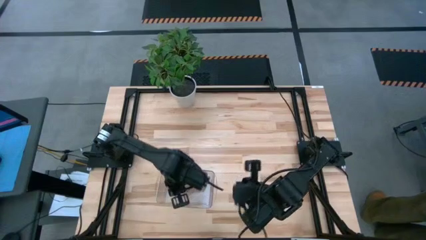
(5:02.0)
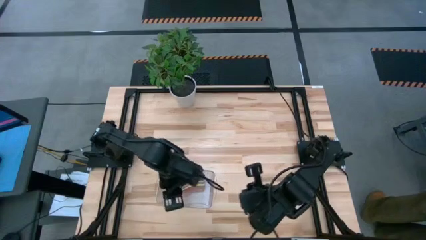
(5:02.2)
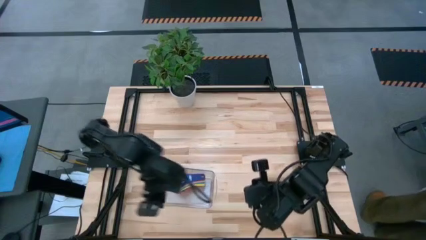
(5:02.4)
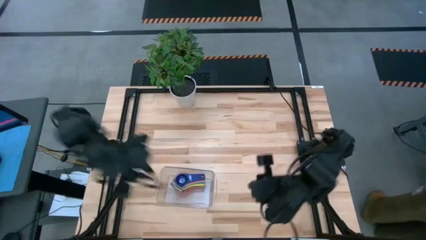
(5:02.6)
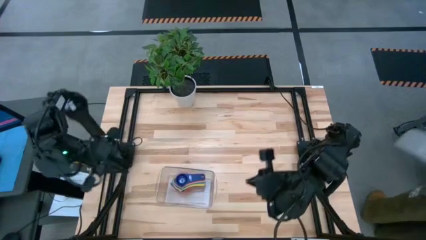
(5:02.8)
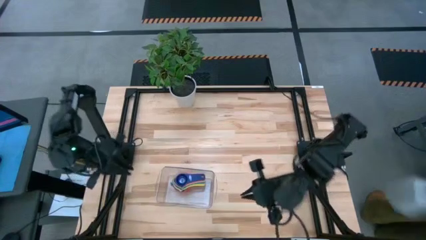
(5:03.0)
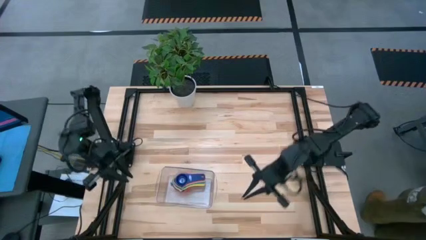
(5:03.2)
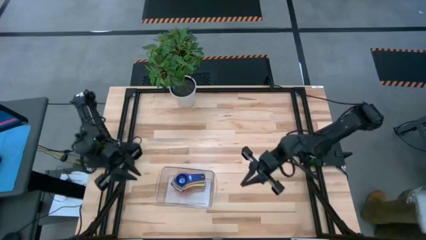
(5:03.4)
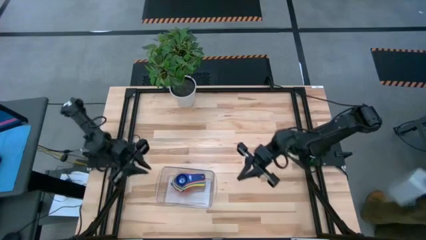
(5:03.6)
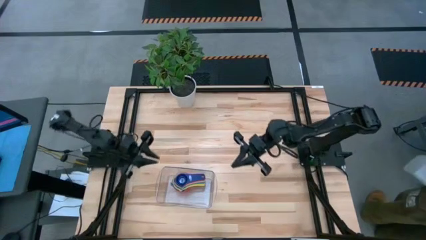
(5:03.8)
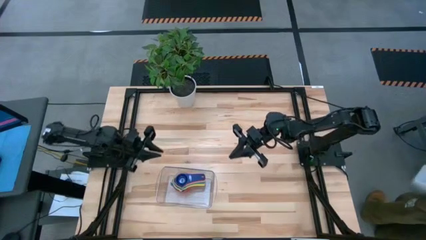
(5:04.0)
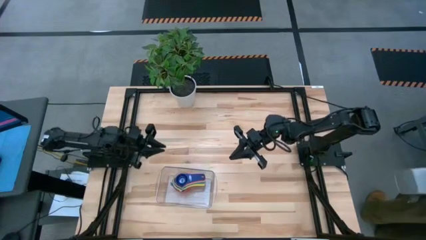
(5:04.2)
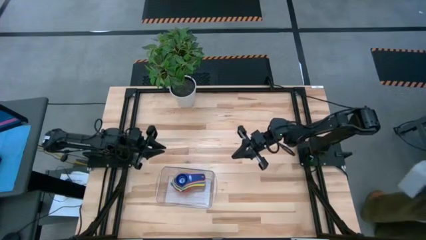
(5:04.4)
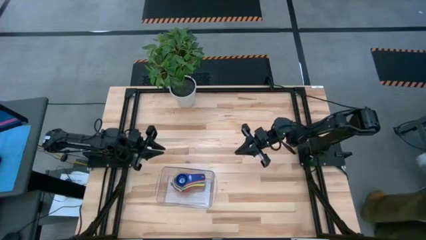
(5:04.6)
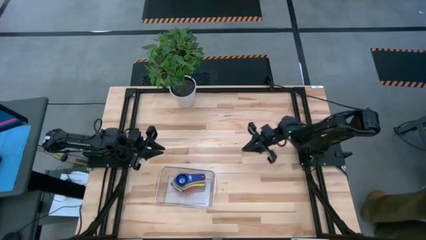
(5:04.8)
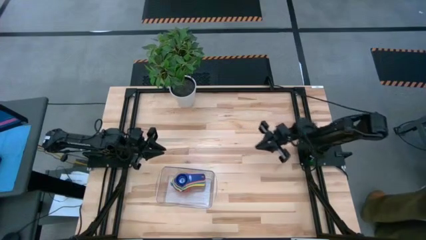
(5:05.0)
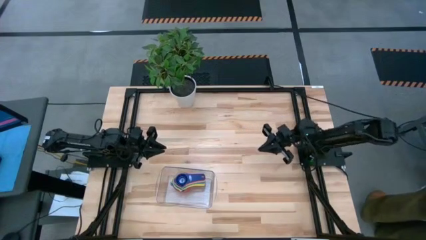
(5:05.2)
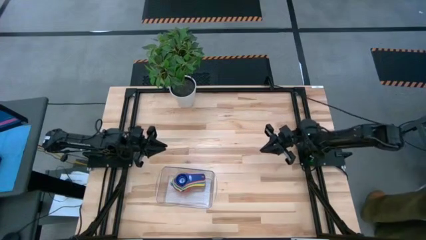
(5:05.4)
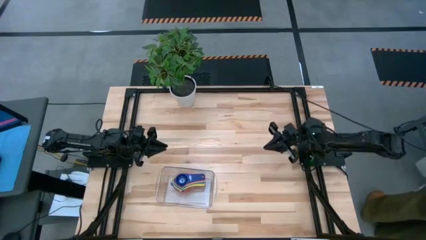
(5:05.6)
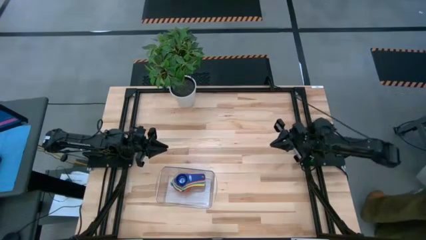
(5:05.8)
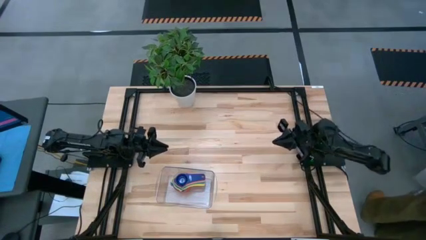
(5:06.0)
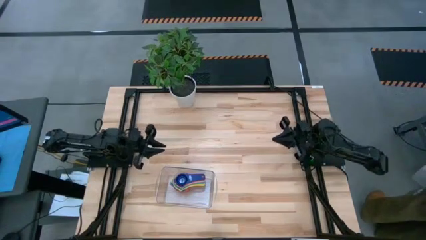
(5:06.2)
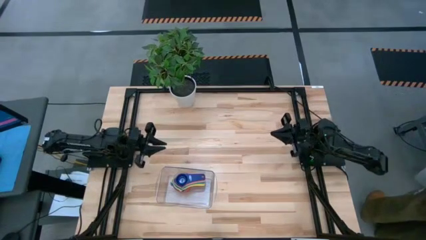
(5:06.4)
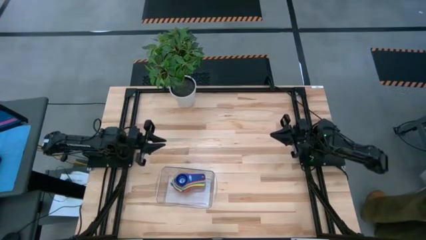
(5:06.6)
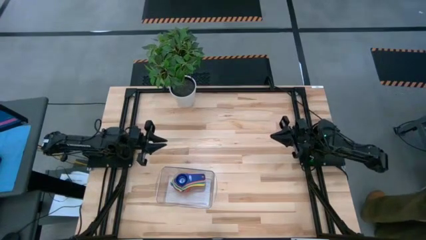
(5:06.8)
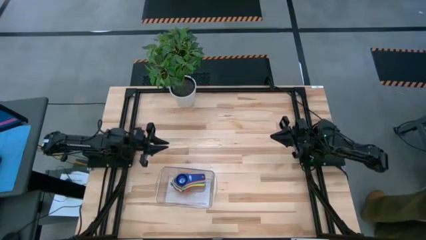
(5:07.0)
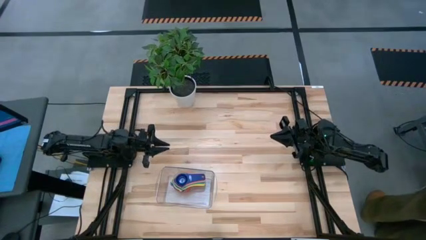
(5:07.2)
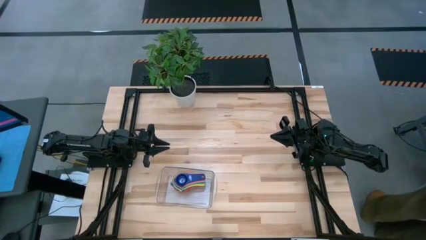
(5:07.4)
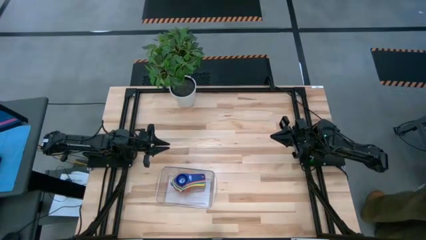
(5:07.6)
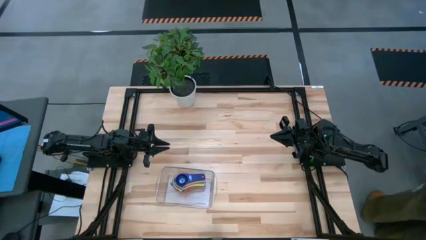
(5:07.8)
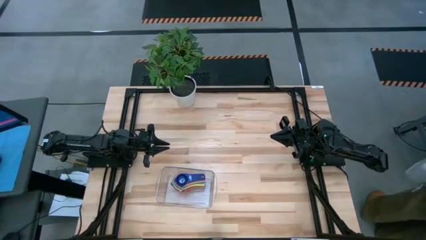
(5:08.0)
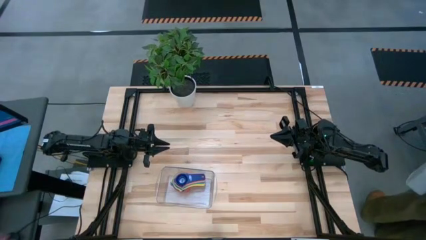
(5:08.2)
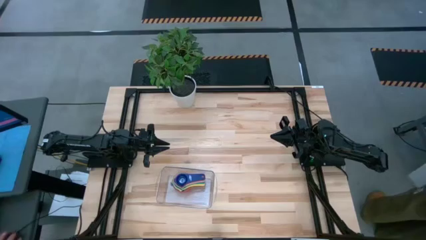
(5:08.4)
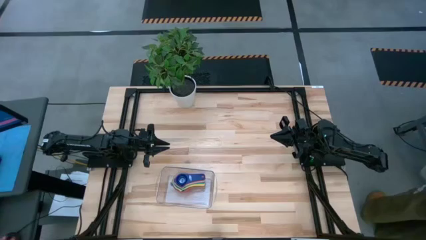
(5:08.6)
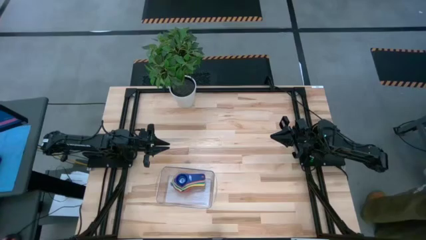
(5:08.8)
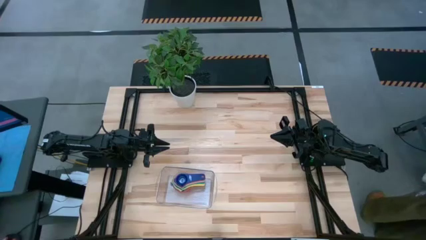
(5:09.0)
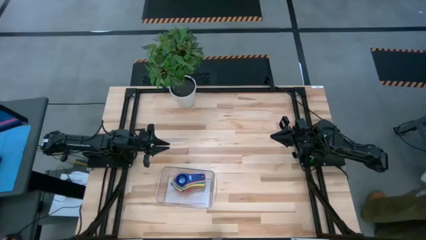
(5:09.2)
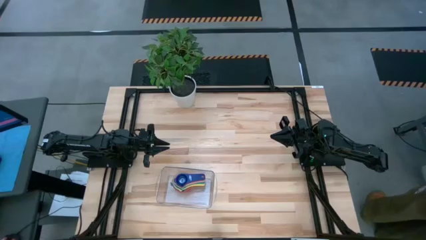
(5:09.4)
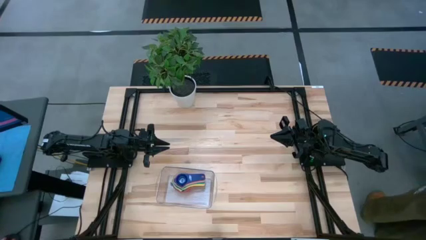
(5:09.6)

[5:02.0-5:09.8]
Task: Nest measuring cups in basket
Return to Home Position

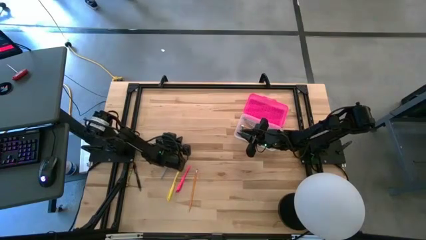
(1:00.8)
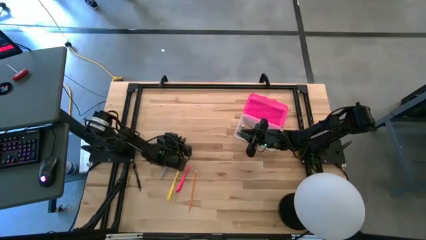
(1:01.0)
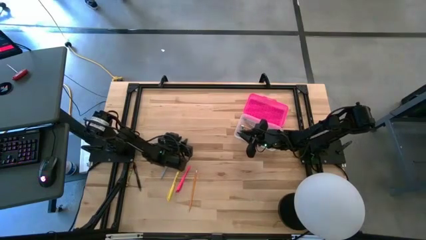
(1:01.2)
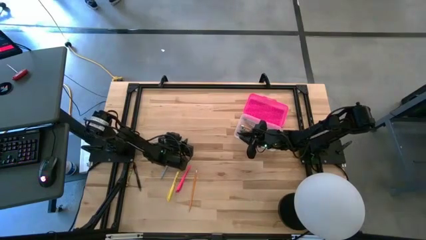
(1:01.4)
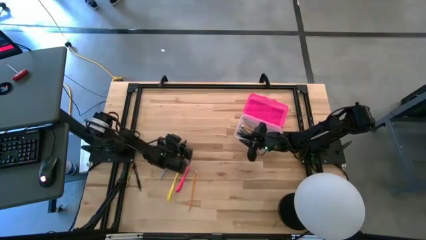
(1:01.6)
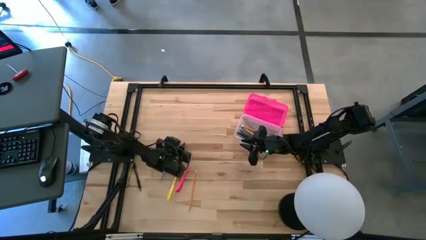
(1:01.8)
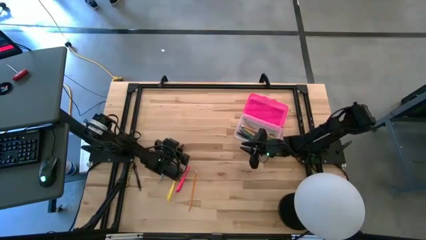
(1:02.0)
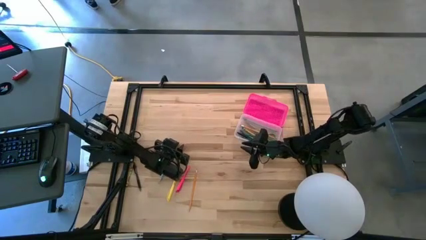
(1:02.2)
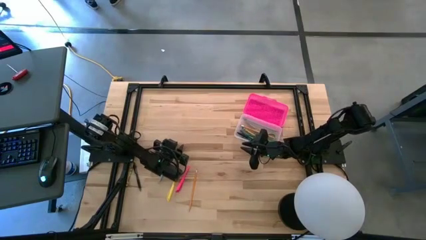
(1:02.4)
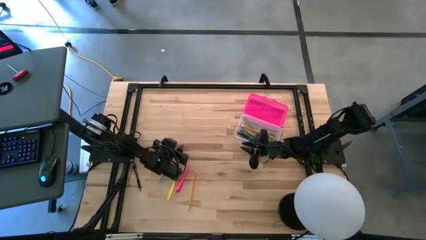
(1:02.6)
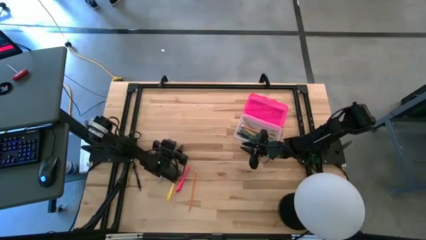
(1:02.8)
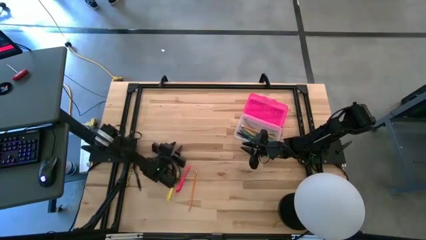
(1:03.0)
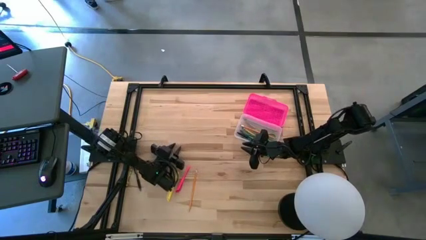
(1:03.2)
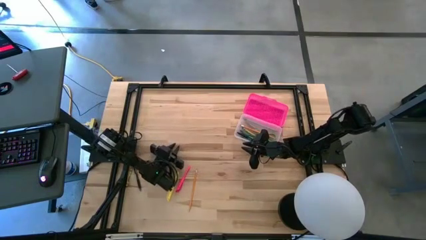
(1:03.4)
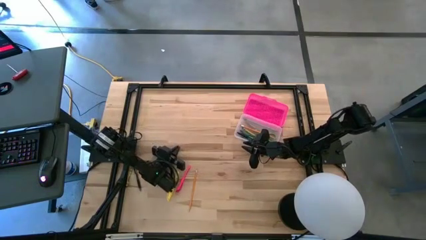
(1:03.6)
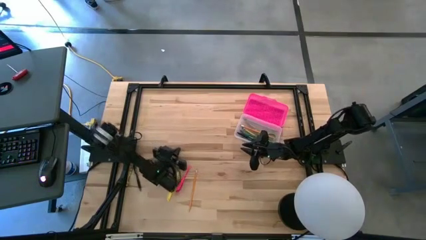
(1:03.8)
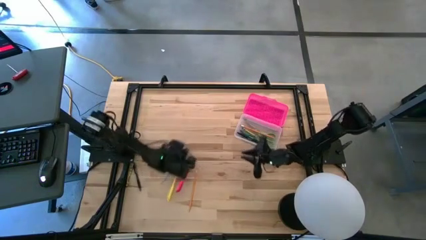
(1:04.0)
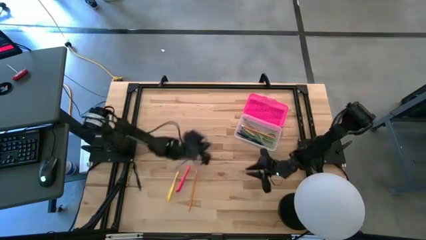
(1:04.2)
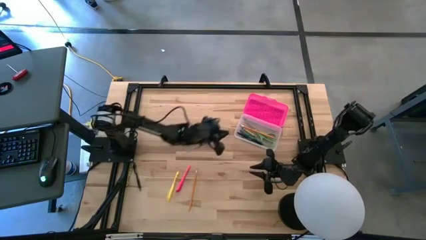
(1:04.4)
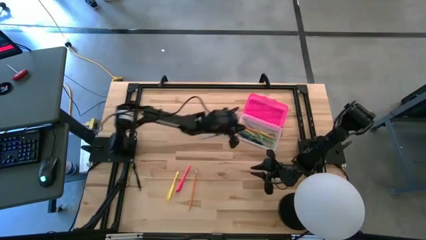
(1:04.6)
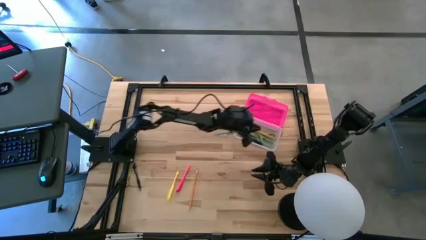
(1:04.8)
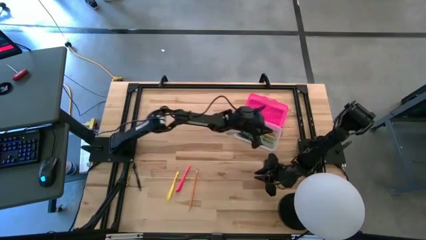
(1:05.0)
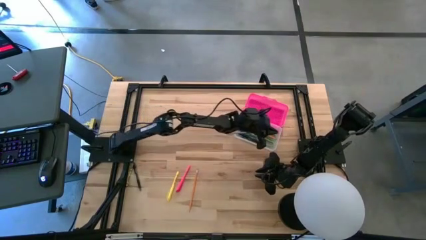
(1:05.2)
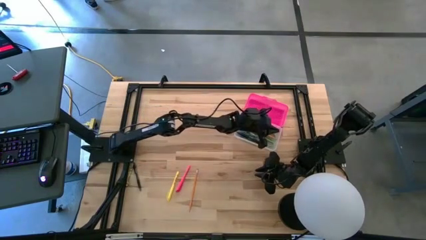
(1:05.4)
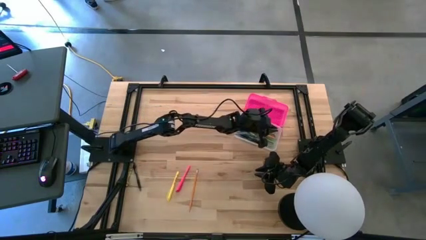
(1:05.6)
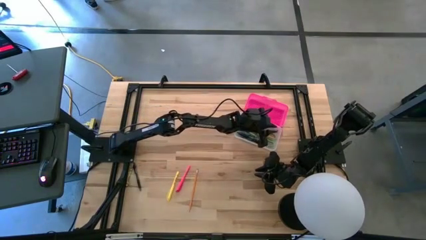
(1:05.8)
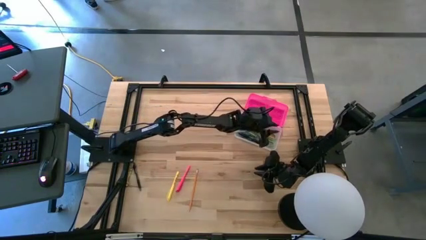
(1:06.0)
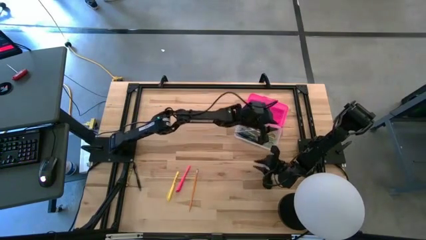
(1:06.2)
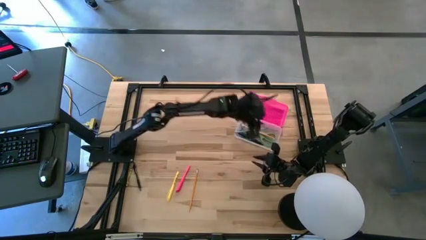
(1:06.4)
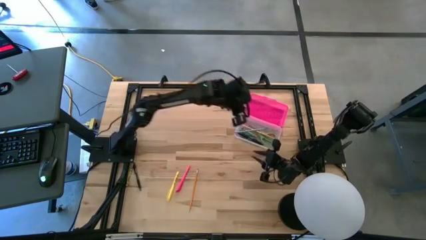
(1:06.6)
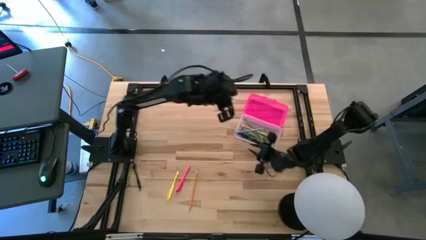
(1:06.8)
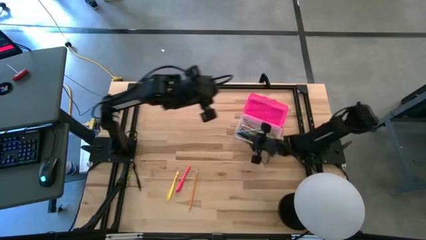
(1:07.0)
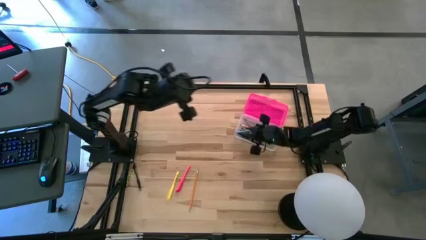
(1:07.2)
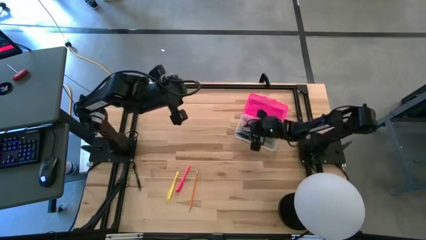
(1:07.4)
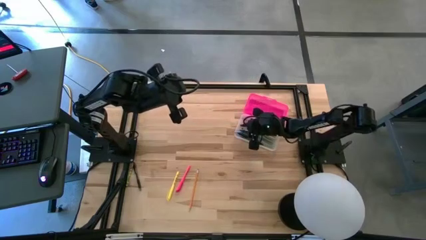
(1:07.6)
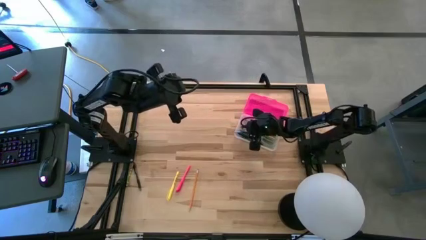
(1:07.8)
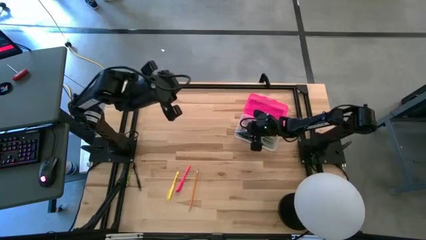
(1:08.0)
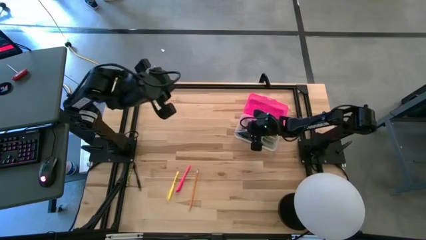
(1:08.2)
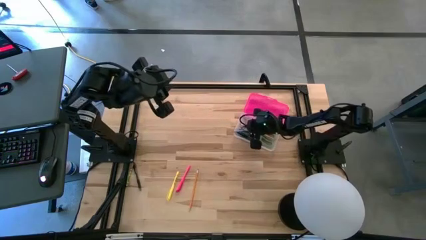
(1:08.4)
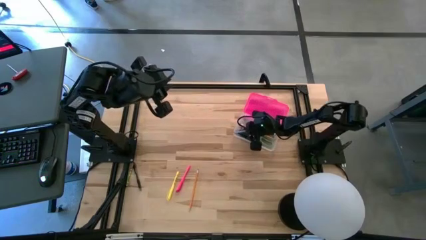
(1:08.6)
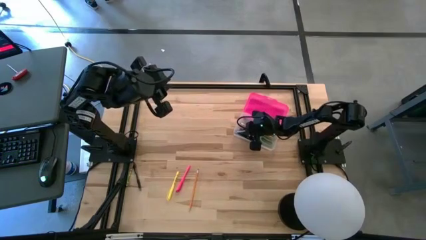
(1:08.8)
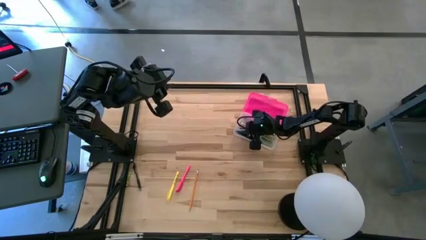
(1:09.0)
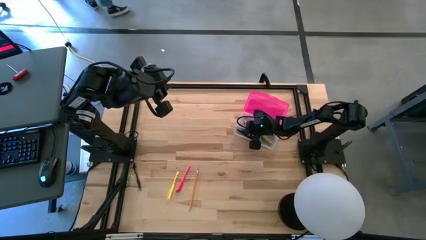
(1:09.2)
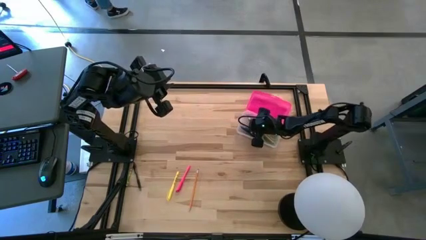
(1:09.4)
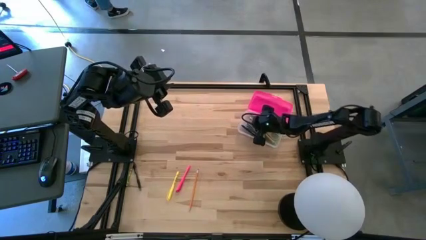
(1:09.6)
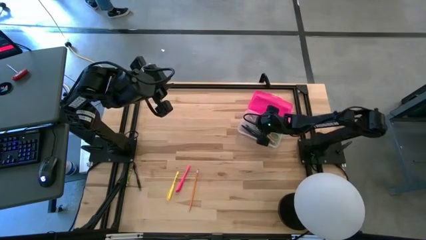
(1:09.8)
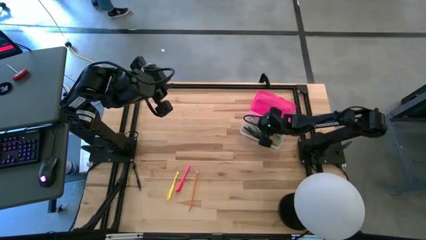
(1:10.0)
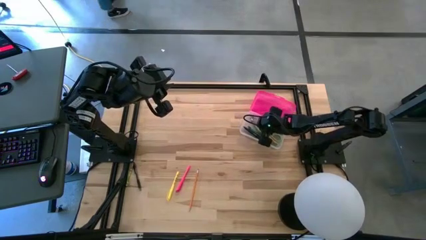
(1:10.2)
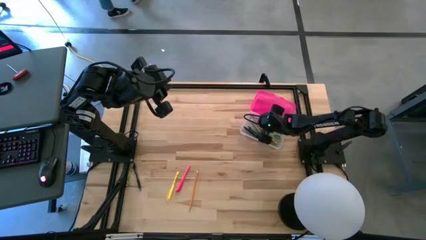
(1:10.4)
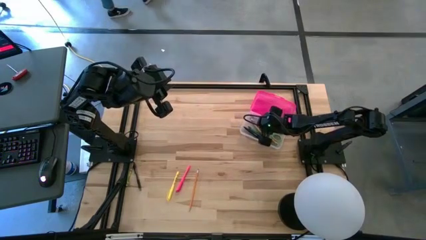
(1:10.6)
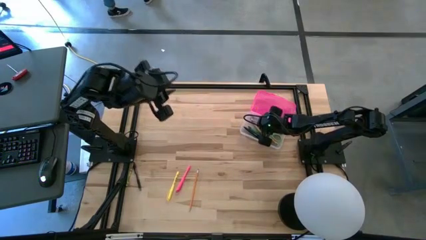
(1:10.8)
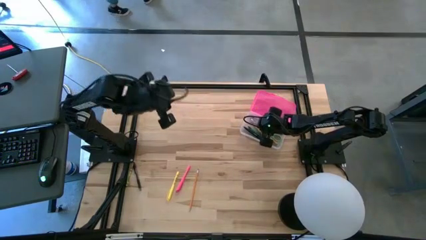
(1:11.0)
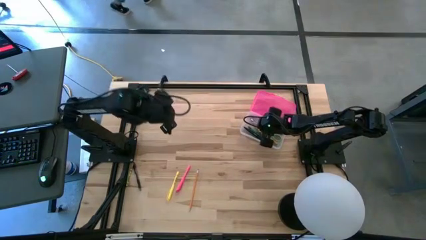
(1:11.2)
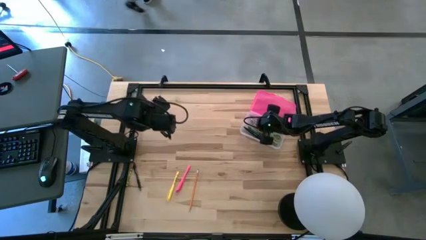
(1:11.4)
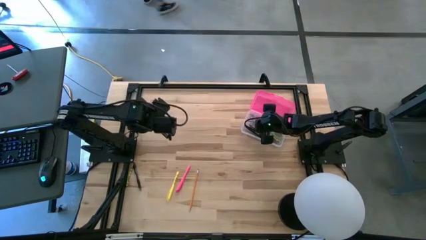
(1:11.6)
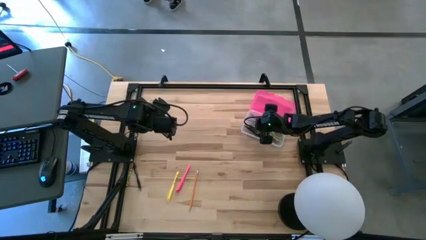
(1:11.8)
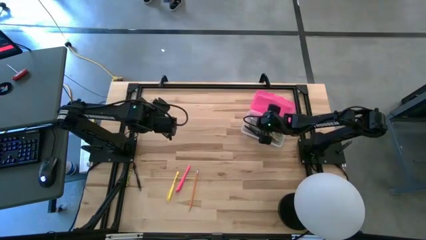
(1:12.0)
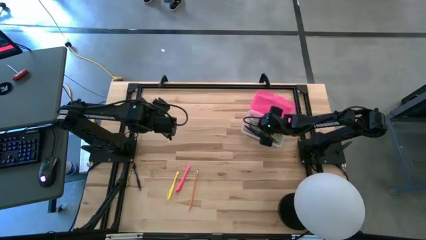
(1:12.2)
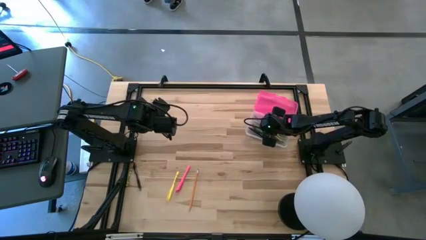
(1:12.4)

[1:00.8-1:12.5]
Task: Pick & place school supplies into a supply box
Put the blue pencil into the pink supply box
